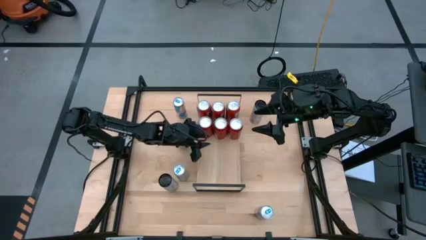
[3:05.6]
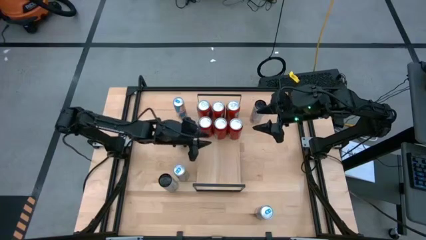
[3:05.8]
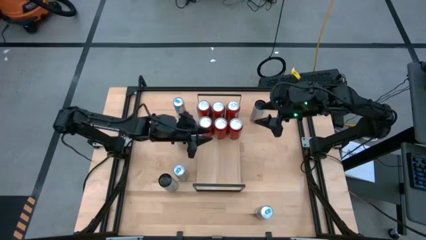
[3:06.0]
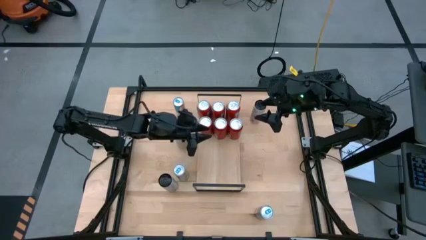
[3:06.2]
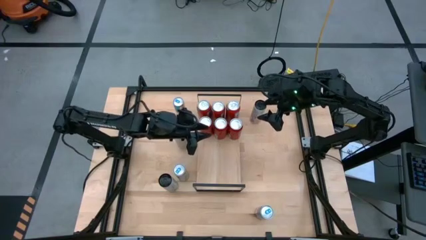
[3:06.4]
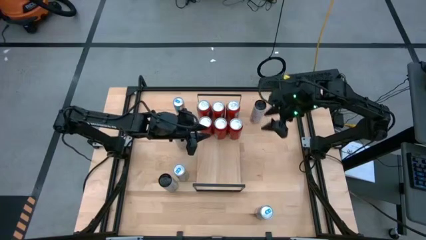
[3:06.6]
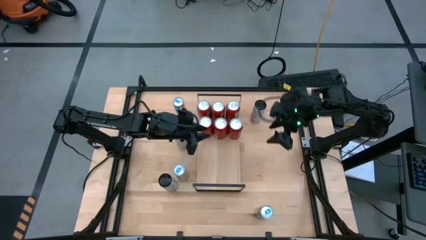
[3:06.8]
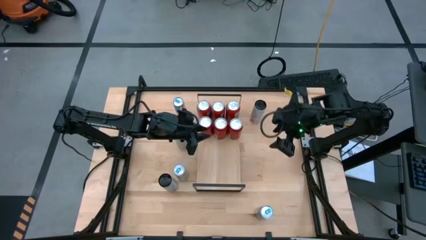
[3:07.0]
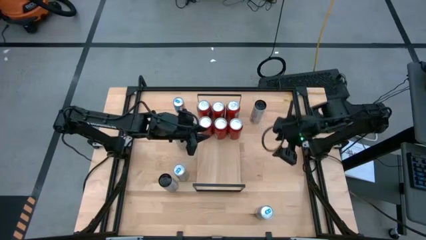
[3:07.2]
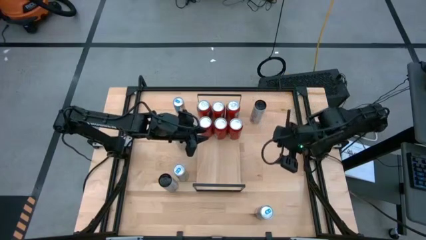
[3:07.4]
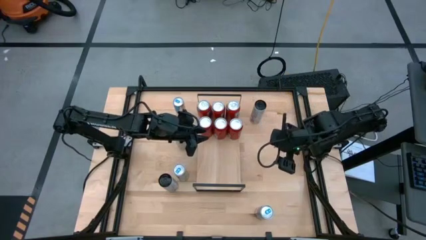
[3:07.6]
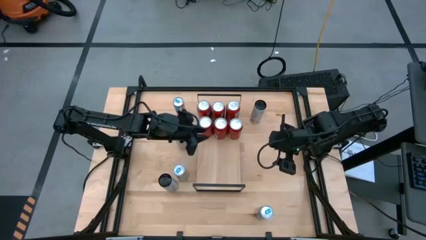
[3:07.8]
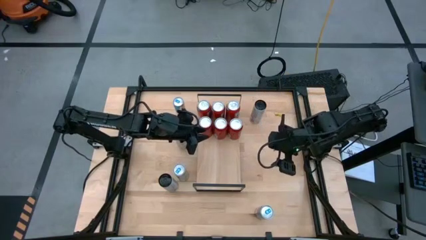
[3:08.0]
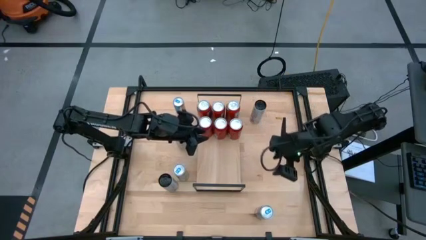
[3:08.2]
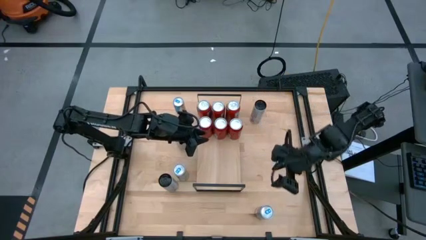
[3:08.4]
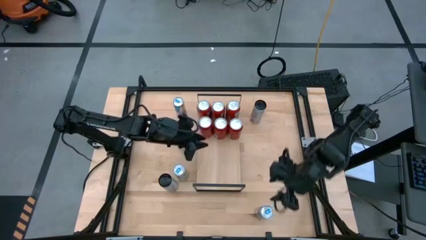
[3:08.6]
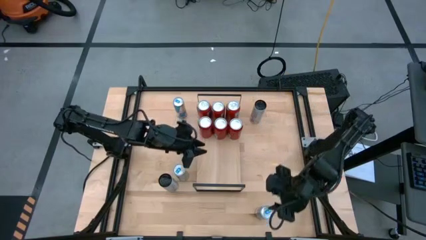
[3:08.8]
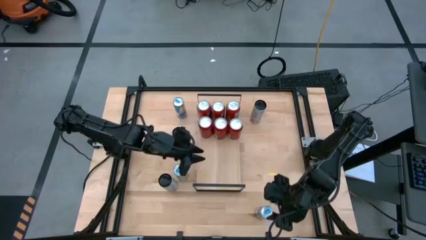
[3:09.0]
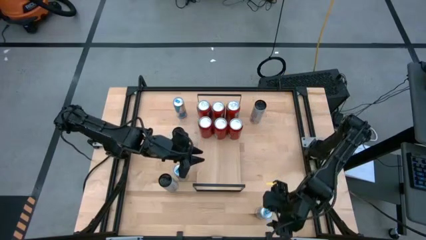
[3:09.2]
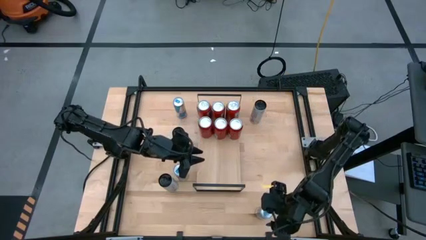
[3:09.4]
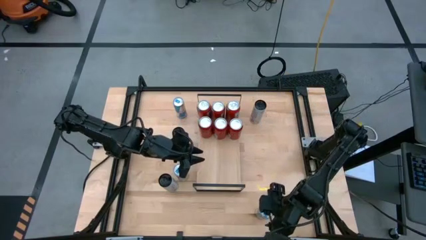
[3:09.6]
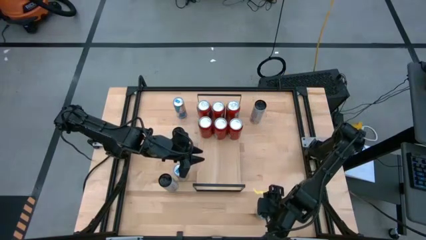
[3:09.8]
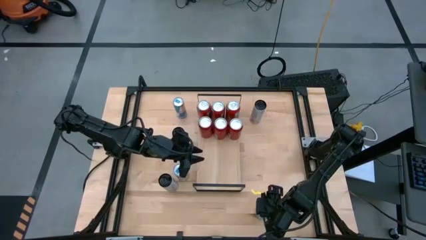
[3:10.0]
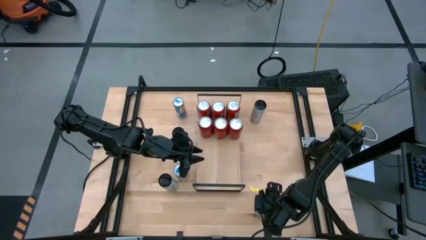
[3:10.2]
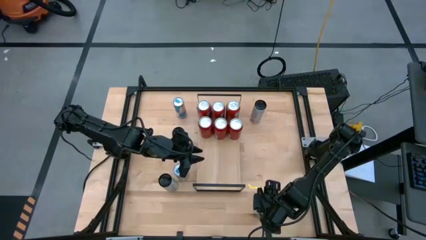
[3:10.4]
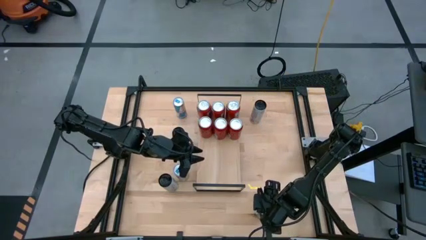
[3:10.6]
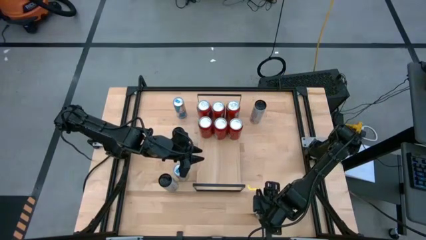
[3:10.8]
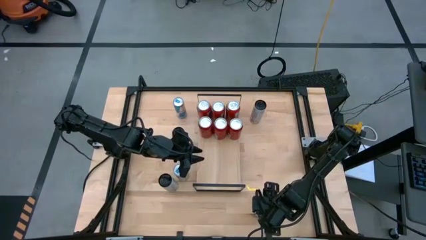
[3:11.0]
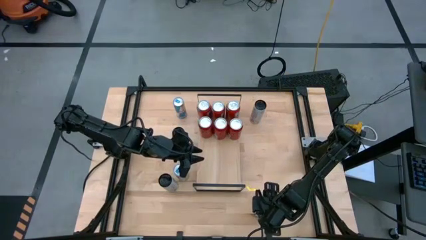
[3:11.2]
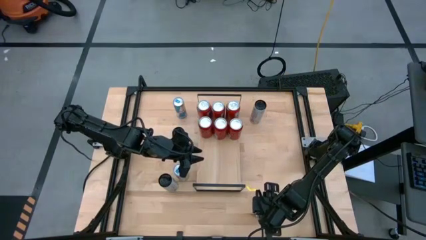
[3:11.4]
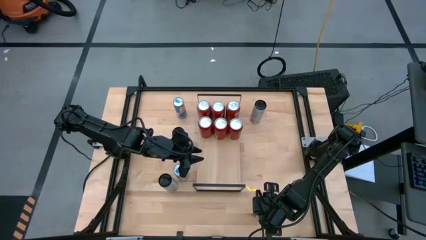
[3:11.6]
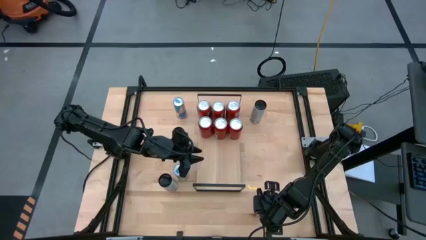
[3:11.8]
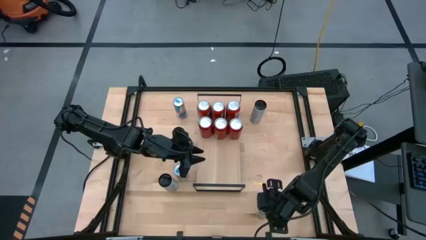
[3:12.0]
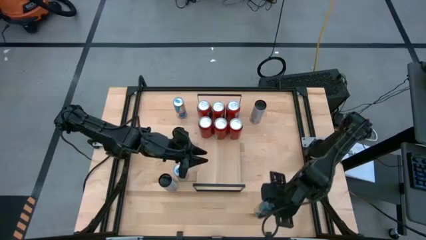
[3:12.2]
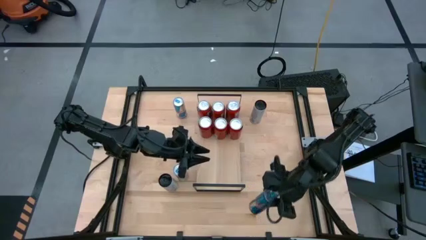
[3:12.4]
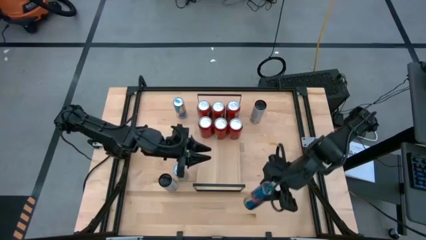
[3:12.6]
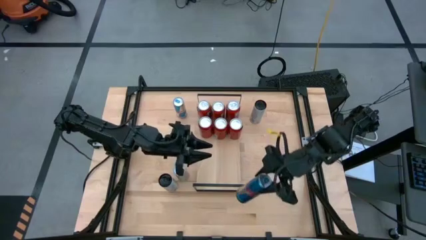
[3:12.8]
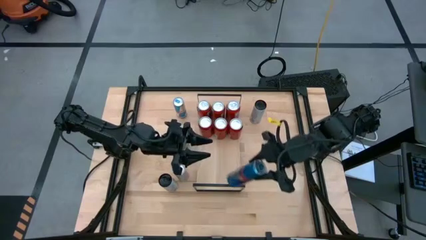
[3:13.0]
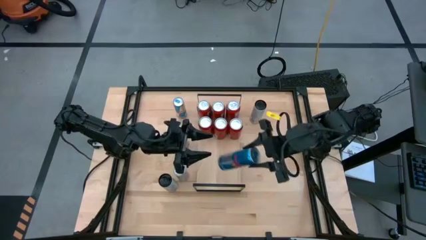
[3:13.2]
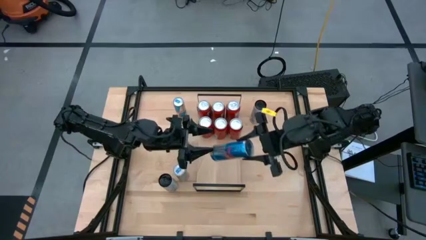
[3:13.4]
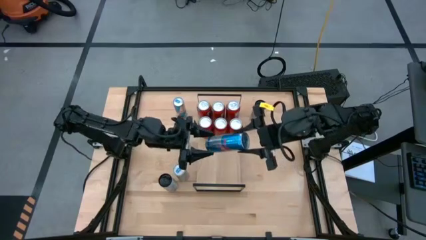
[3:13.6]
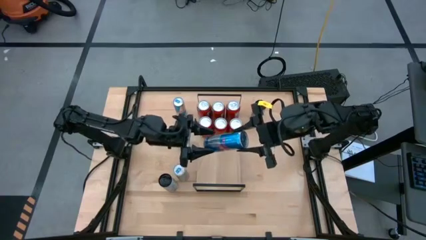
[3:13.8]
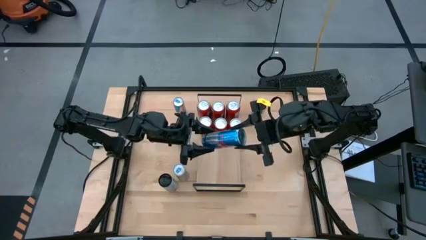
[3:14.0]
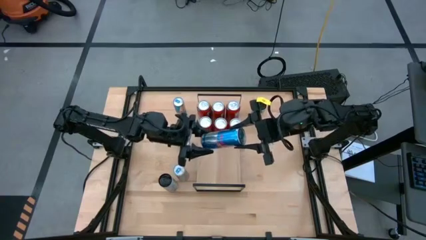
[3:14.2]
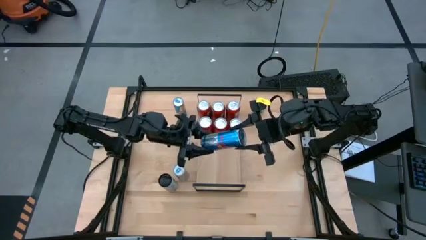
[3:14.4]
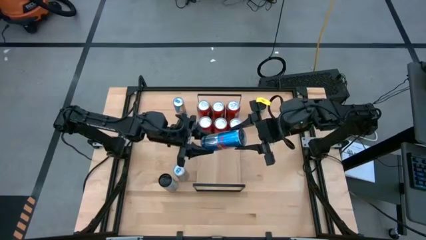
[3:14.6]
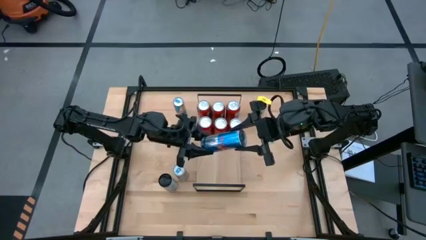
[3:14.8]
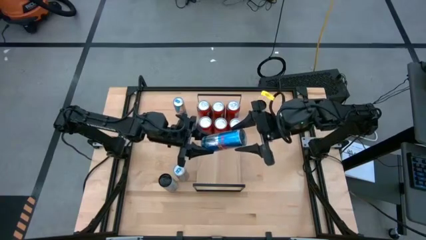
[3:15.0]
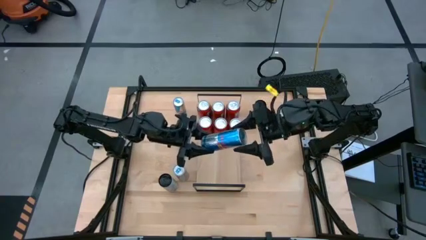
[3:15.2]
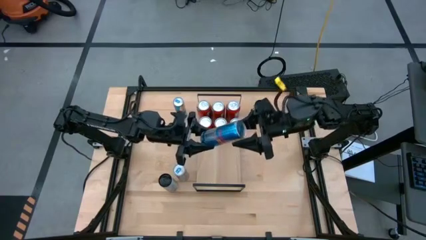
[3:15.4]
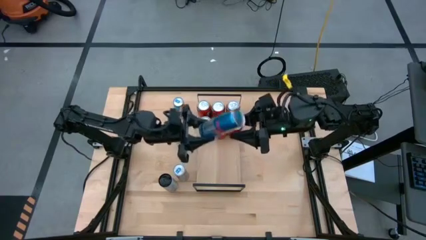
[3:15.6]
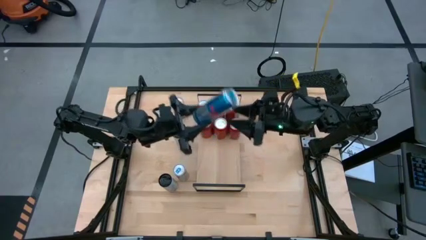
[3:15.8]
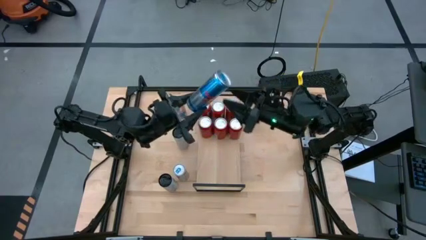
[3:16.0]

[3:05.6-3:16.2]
Task: Place canned beverage on shelf
Put the bottom right blue soda can on the shelf

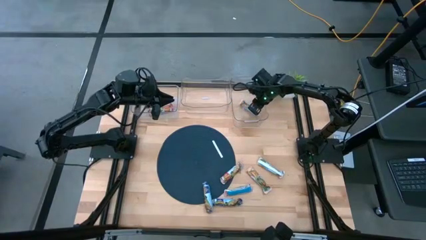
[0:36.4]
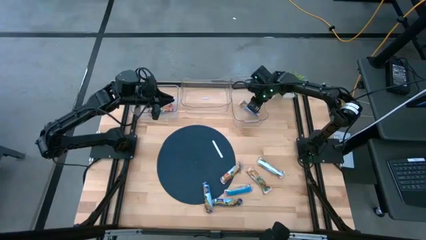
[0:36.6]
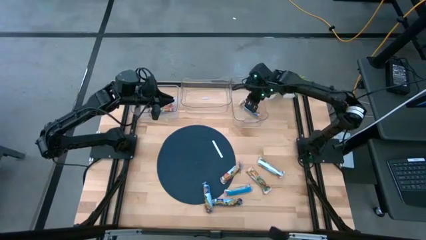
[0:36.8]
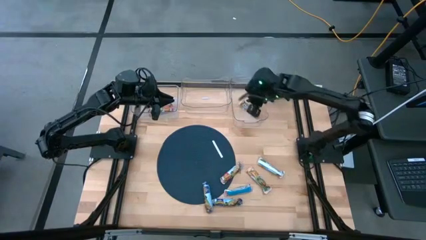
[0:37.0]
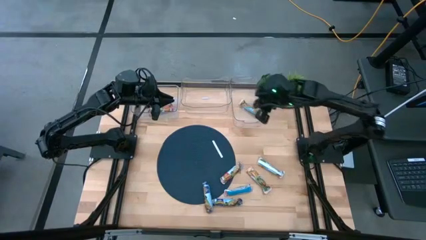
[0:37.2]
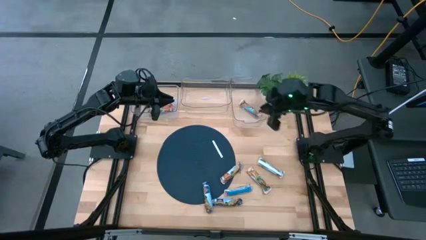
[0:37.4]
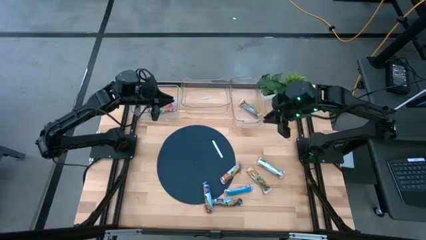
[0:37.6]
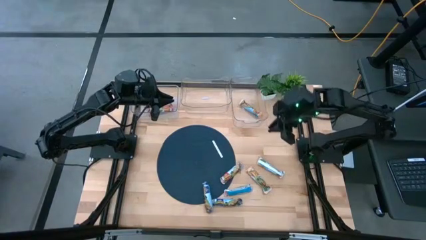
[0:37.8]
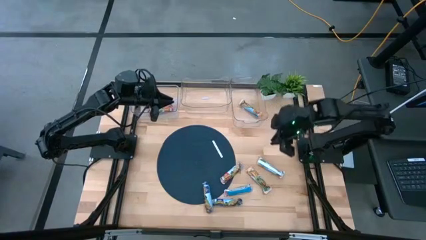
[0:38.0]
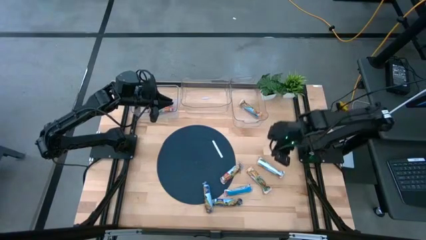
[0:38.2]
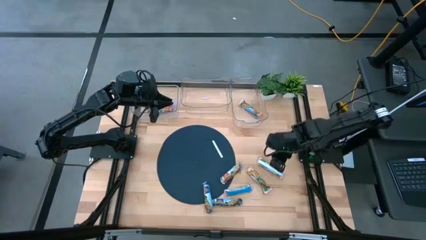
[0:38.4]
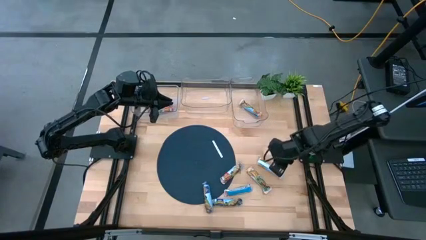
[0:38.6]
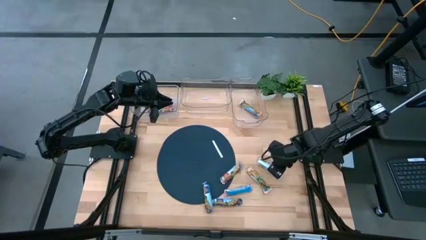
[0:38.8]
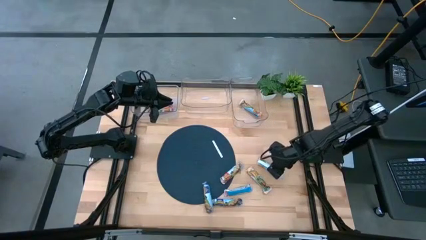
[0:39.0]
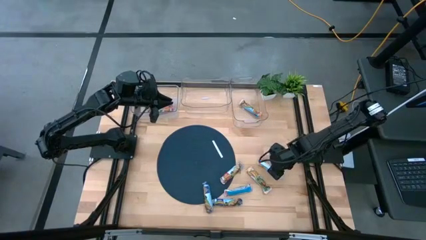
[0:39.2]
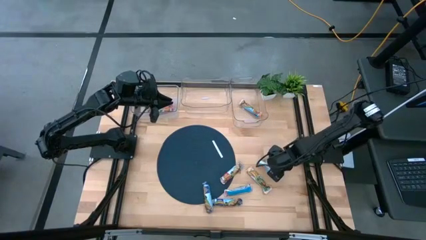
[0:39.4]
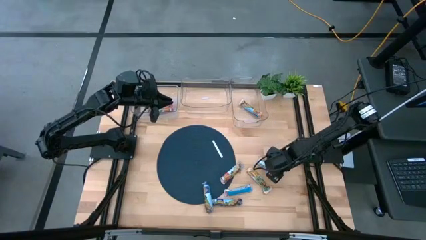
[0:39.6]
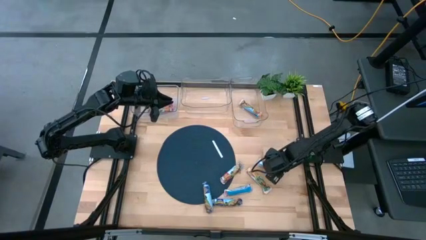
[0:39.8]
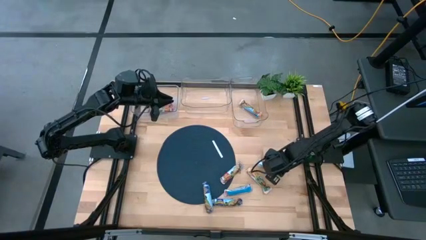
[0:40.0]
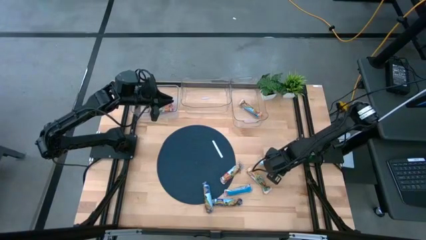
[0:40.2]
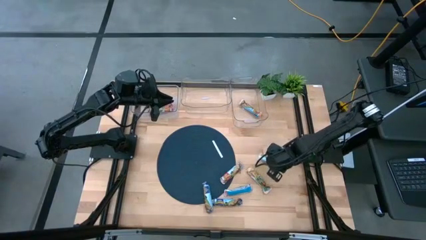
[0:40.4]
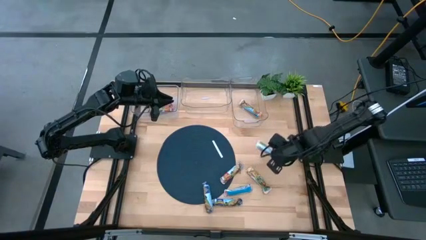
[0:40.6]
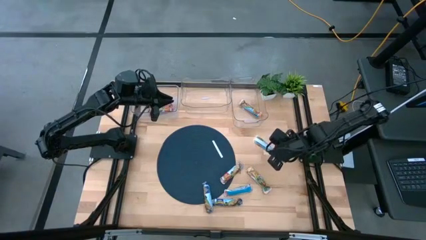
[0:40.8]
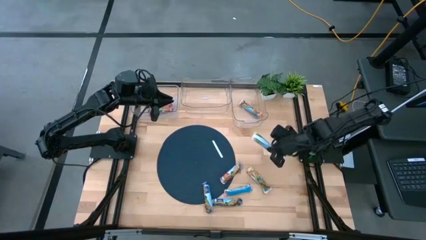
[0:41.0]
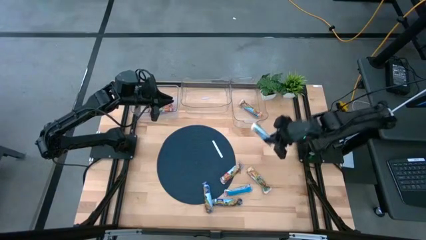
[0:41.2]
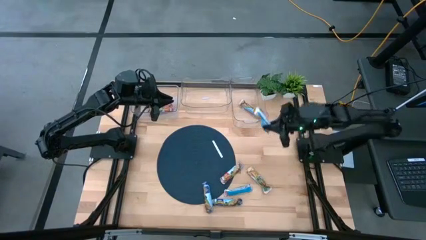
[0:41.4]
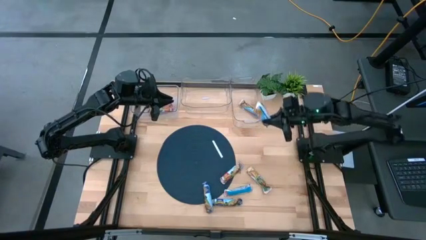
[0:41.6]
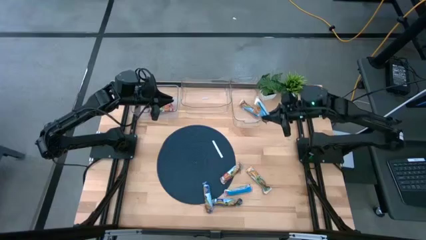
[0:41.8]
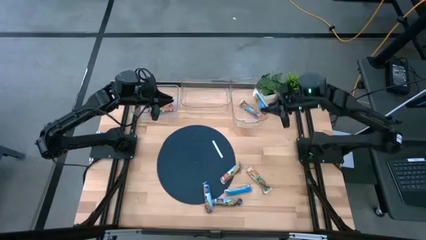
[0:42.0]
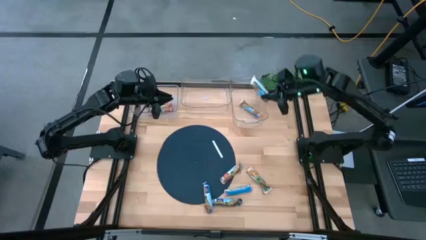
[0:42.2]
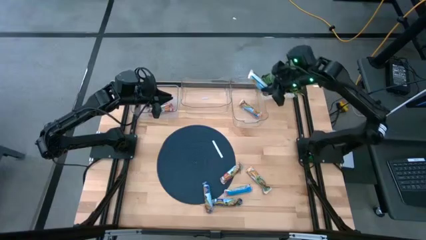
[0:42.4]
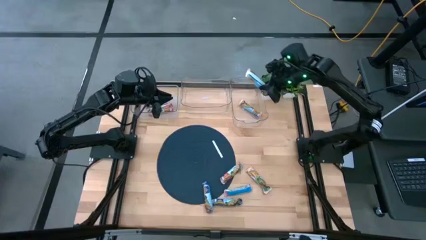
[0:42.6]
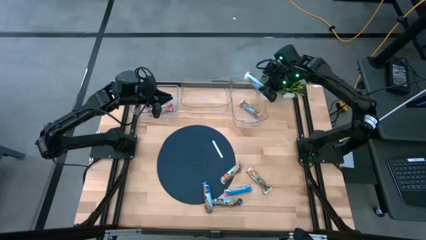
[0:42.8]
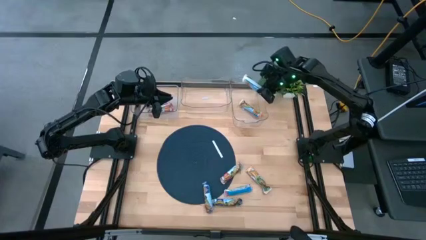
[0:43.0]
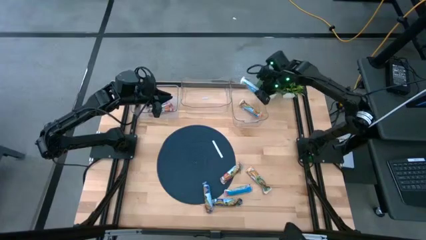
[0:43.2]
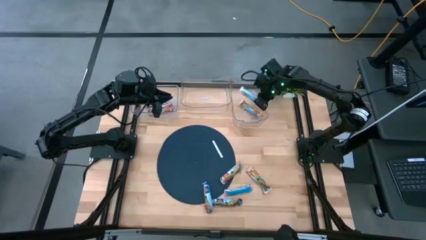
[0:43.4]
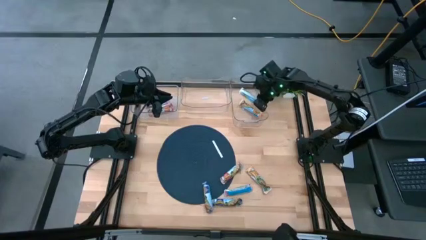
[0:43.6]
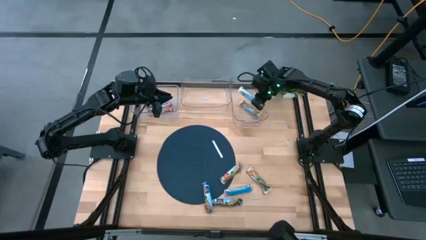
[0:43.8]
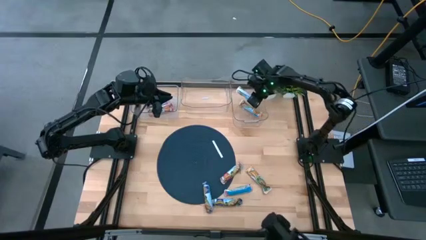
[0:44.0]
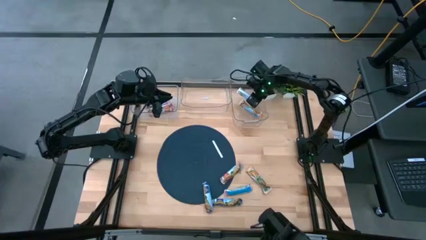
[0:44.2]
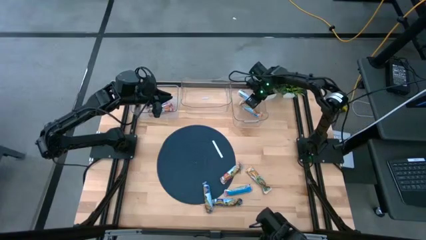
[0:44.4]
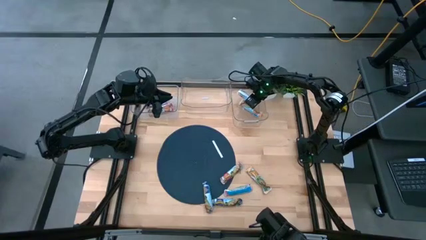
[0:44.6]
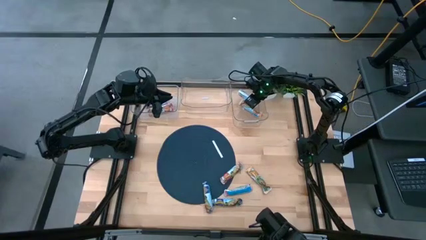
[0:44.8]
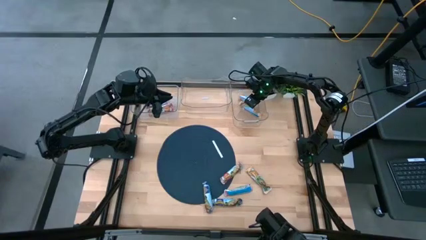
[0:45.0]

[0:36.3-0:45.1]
Task: Pick and place Granola Bars by type
Put the right yellow chewy bar into the top right transparent bin
